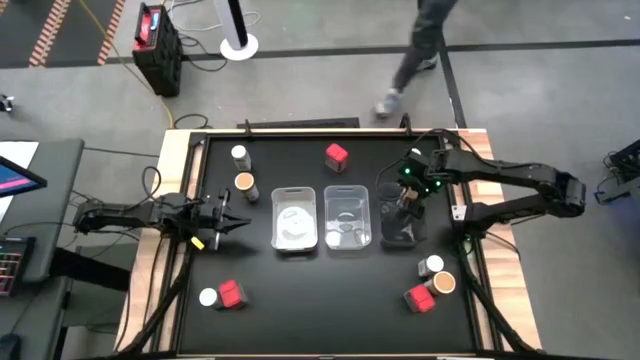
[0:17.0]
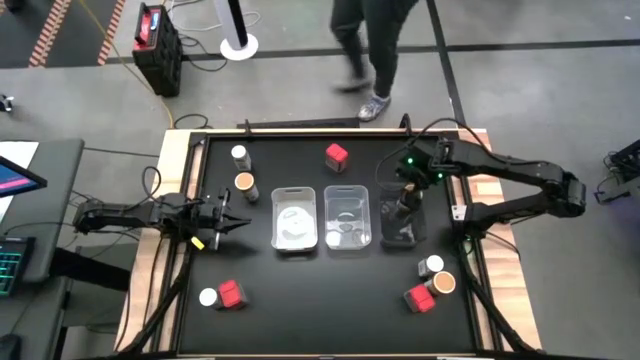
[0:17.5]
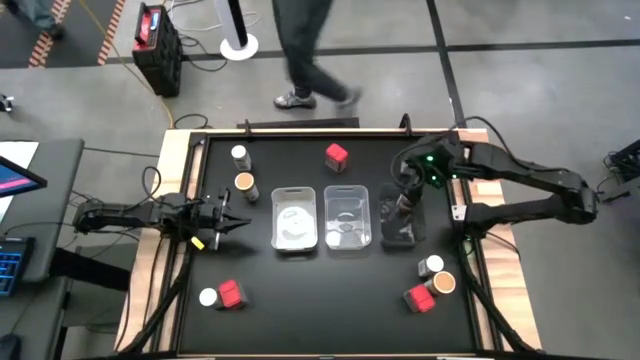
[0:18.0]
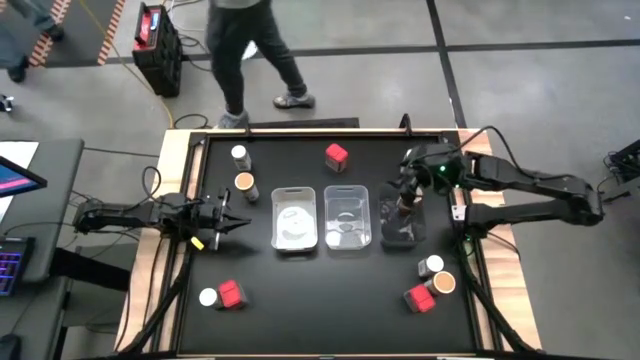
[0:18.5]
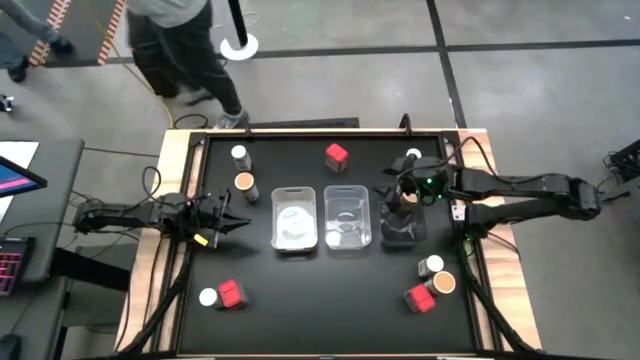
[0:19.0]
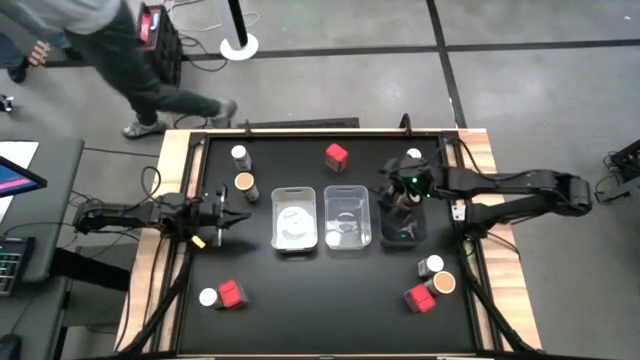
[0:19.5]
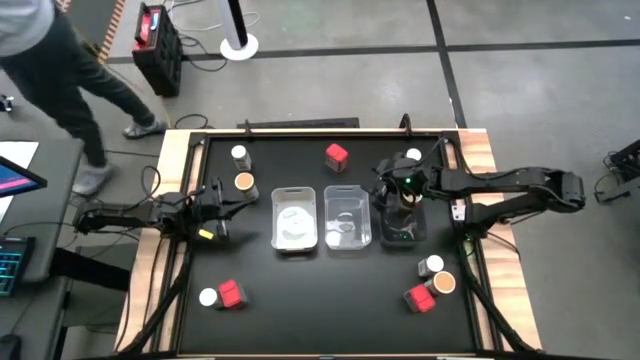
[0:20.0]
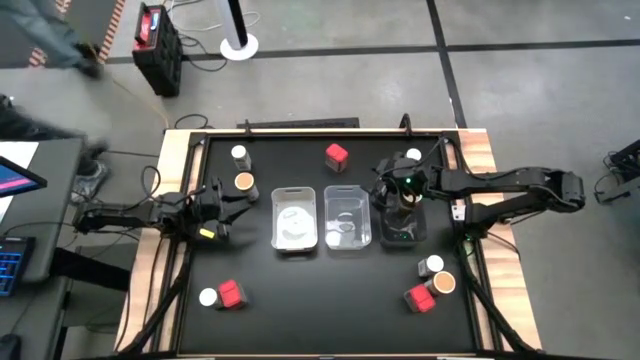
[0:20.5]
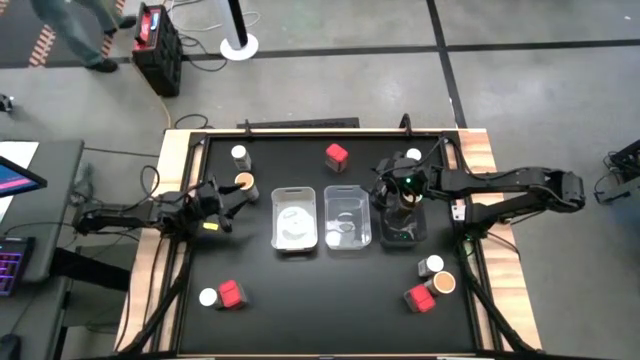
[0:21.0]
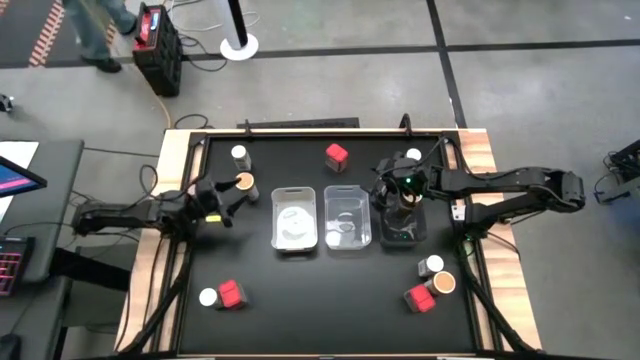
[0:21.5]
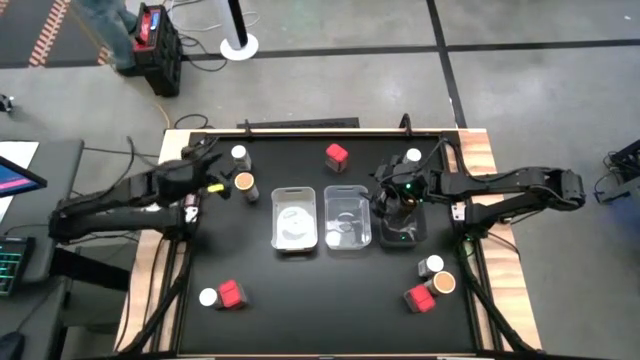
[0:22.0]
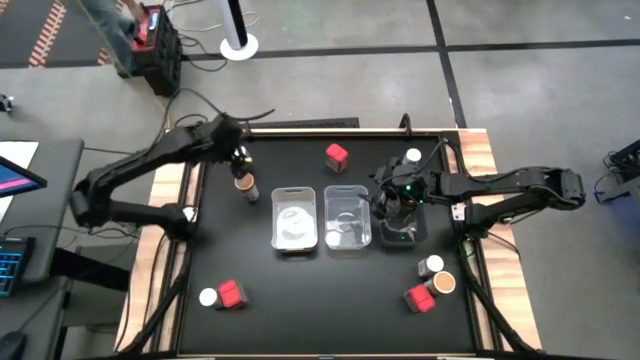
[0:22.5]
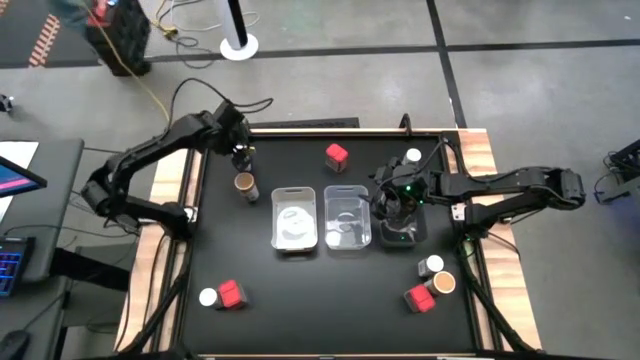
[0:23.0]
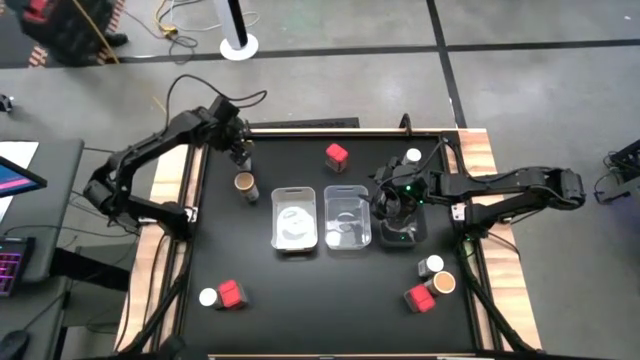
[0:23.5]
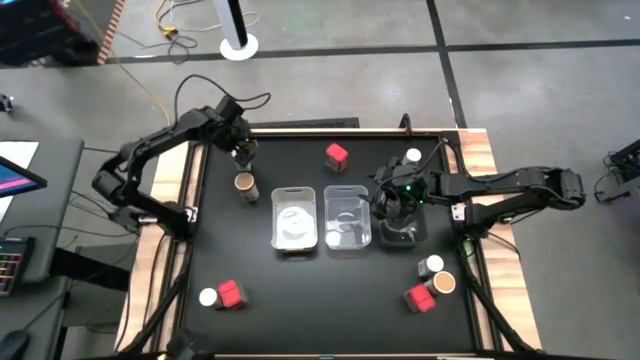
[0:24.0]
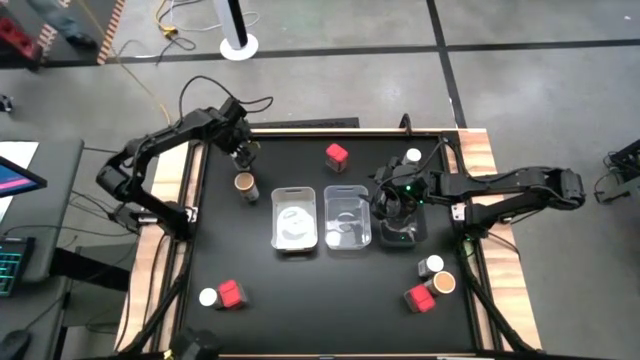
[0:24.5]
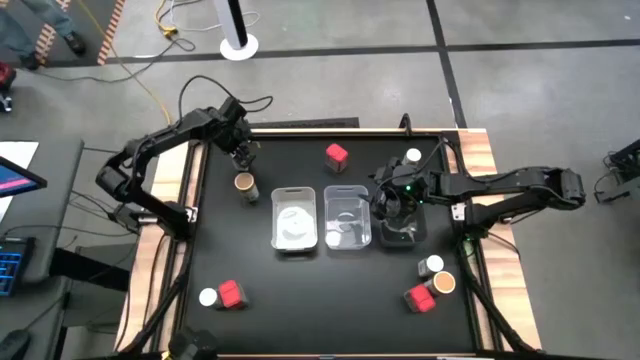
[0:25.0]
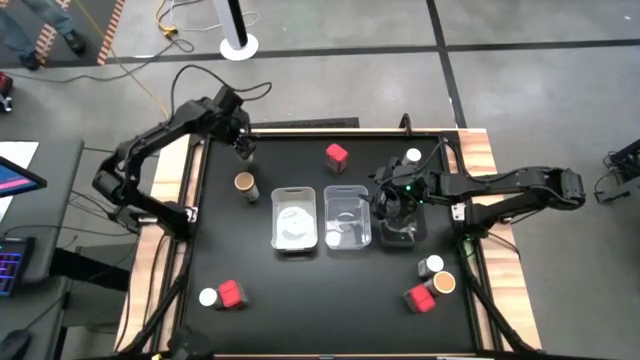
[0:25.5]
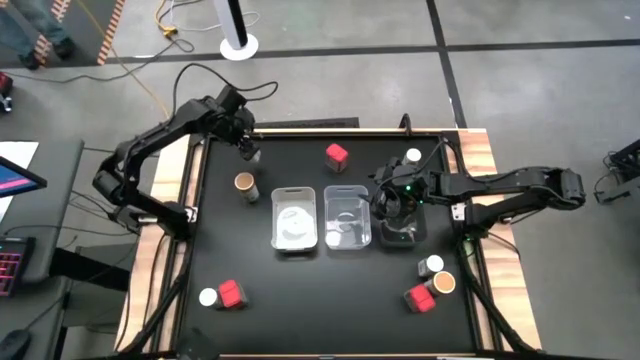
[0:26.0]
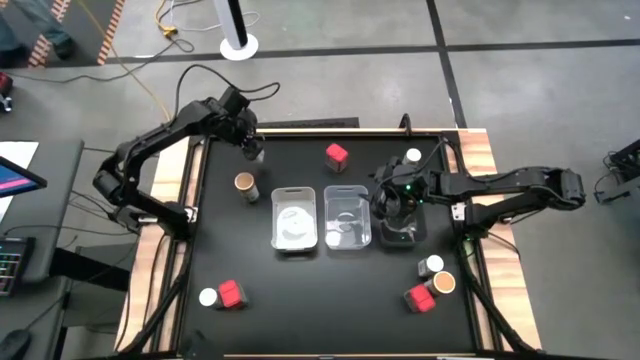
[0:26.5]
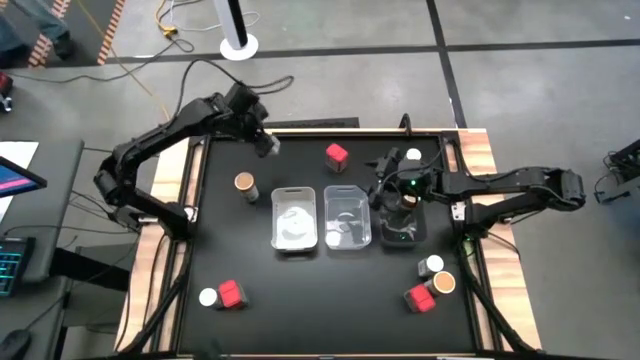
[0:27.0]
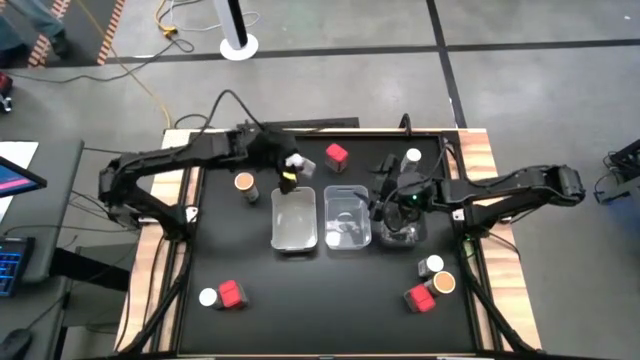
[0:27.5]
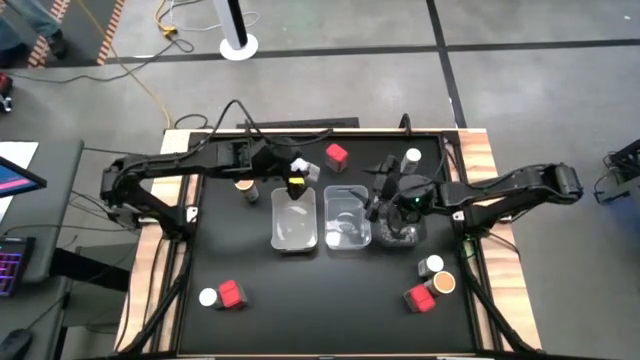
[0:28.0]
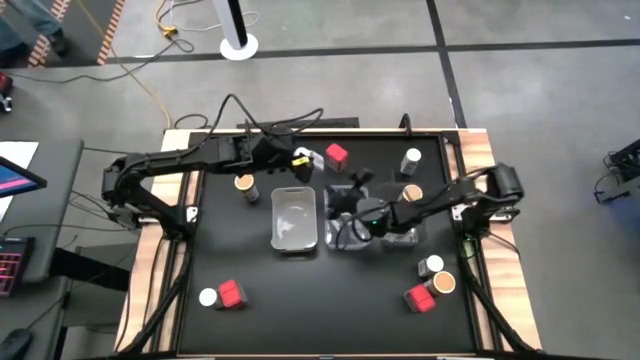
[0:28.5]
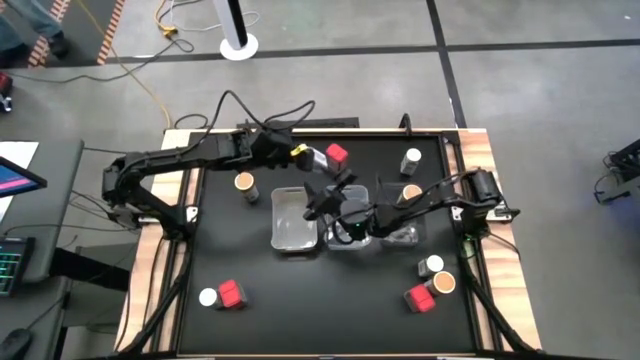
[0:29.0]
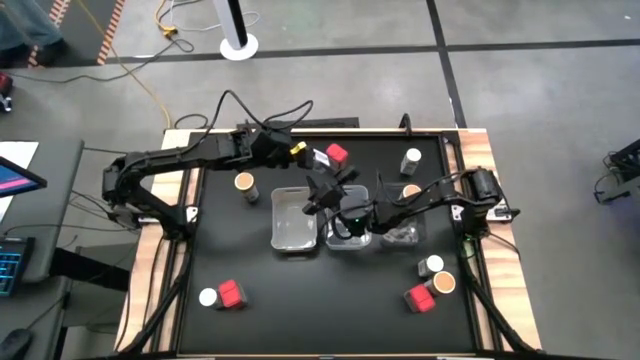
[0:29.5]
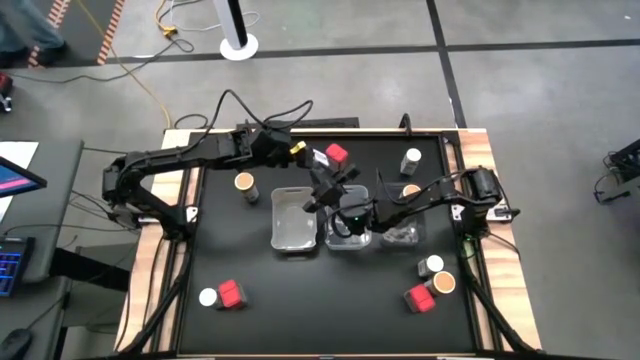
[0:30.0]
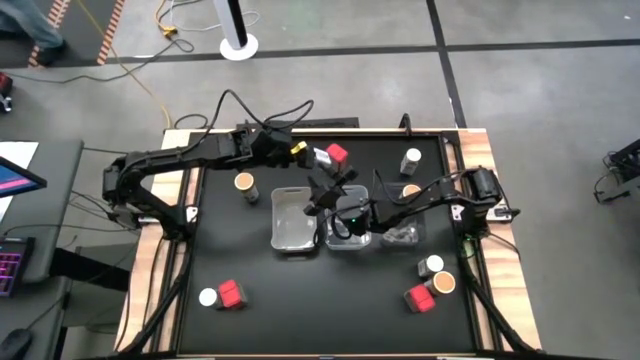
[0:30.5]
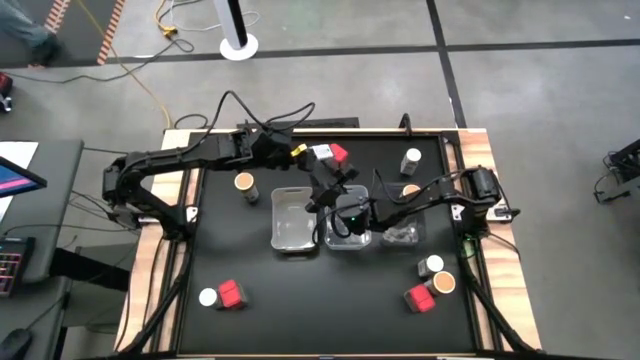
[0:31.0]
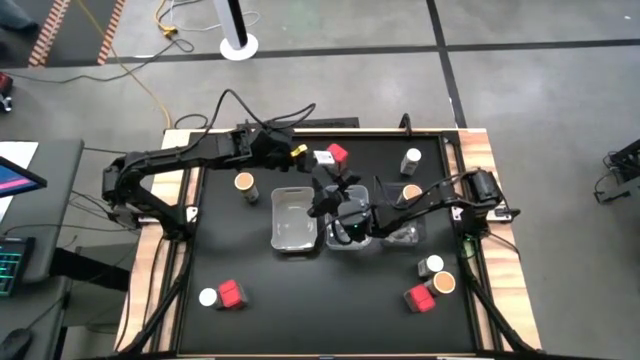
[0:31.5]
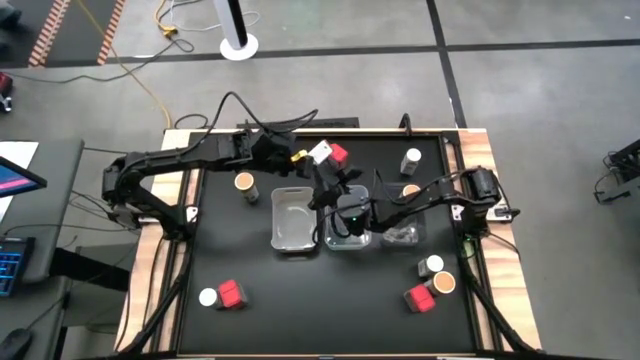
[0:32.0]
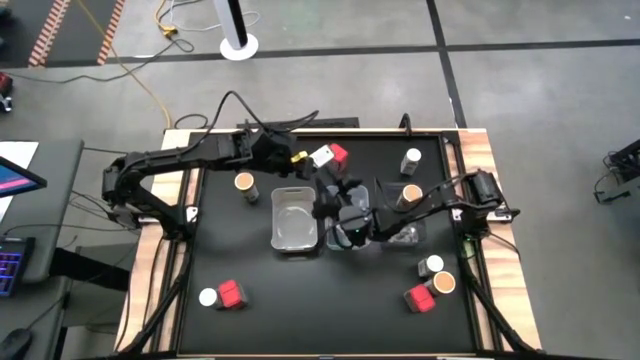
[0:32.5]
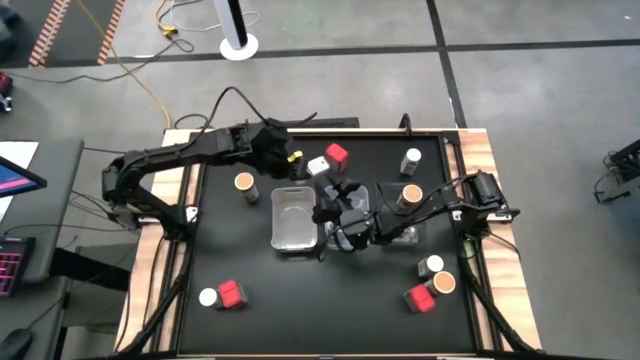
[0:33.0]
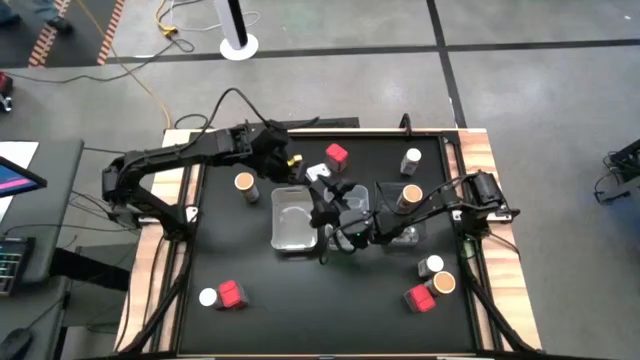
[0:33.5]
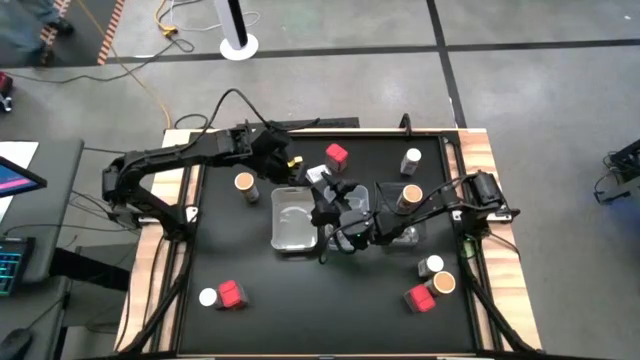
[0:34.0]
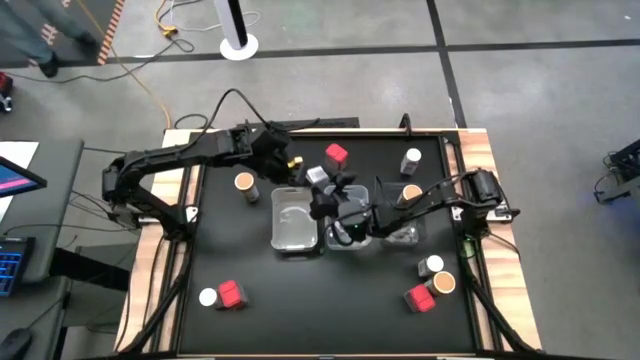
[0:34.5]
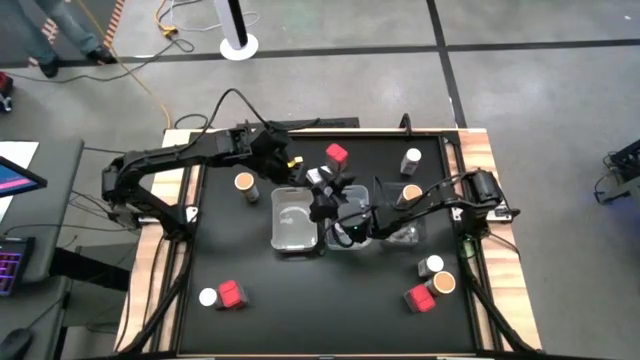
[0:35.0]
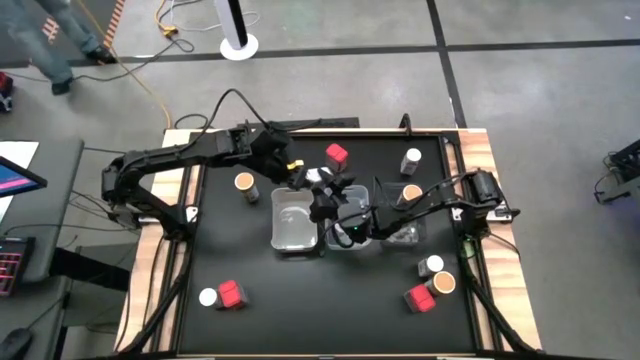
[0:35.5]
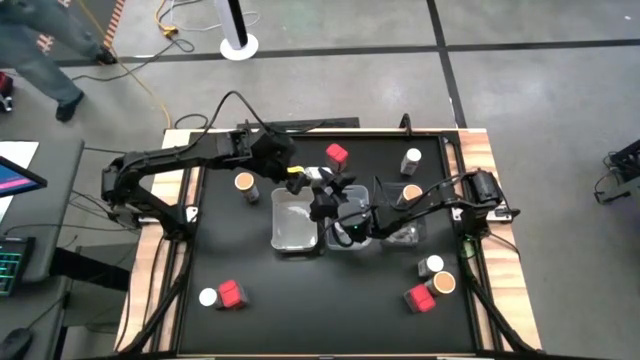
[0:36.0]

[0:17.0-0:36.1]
Task: Sort spices by type
Put the top left white seasoning bottle into the transparent bin
